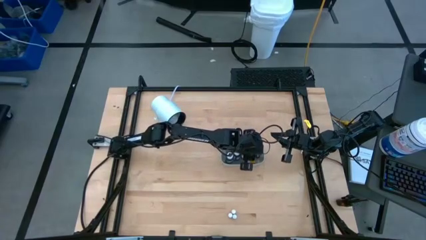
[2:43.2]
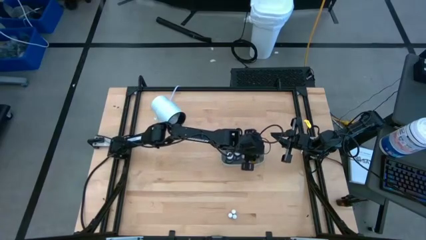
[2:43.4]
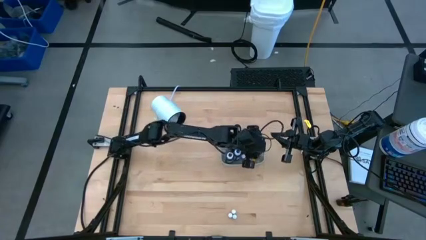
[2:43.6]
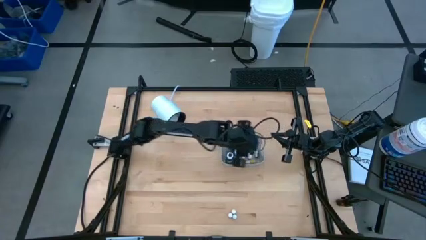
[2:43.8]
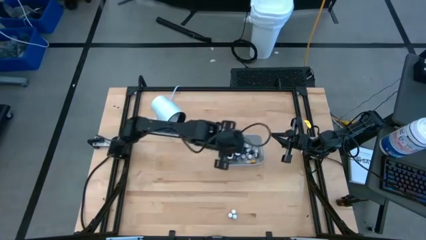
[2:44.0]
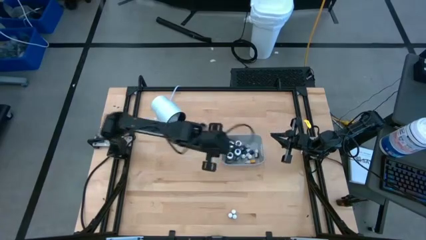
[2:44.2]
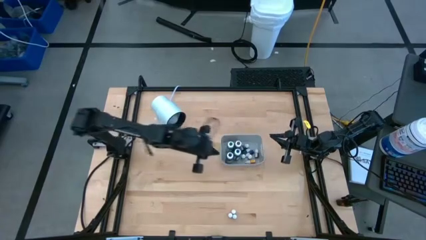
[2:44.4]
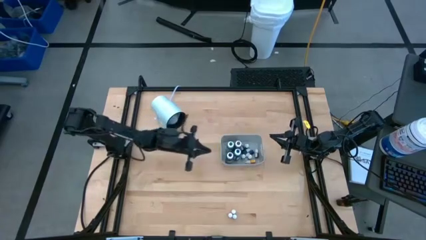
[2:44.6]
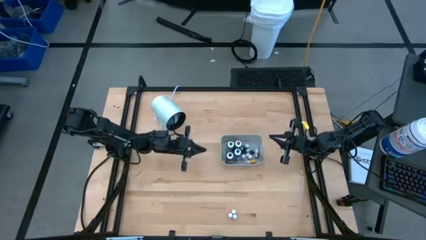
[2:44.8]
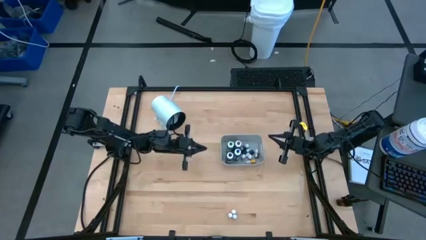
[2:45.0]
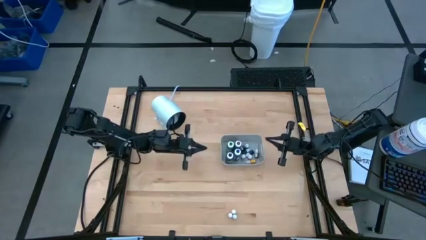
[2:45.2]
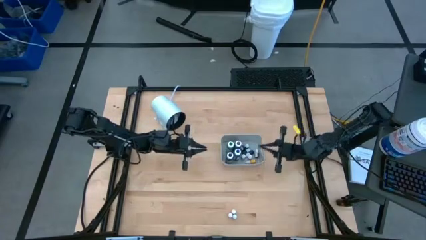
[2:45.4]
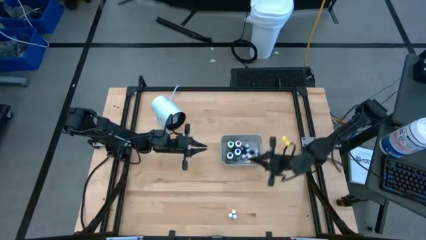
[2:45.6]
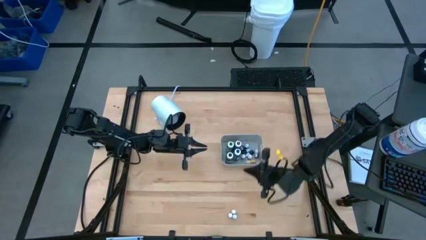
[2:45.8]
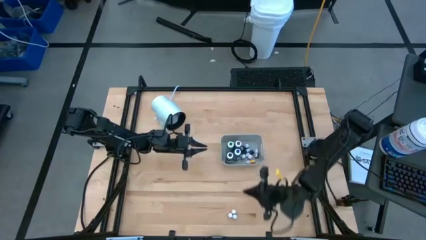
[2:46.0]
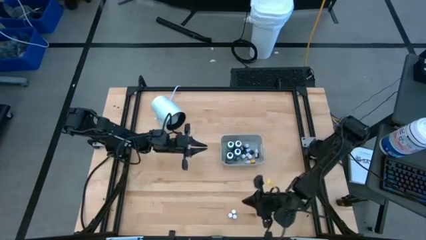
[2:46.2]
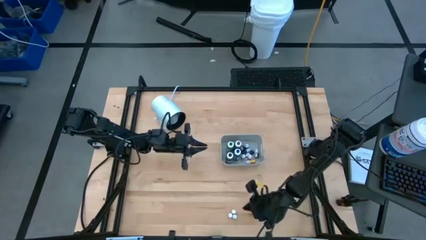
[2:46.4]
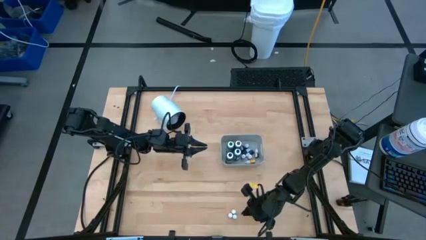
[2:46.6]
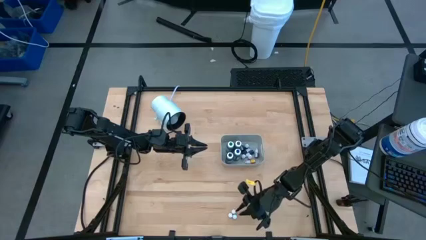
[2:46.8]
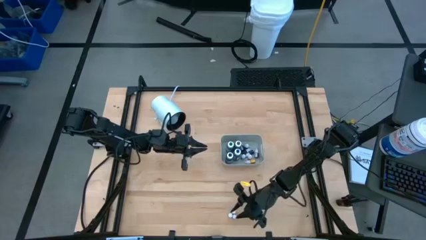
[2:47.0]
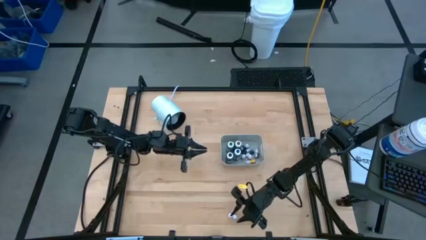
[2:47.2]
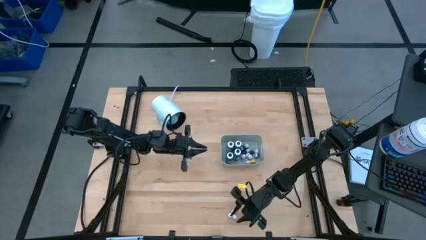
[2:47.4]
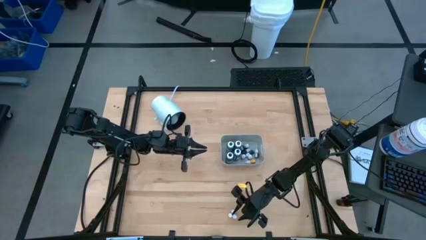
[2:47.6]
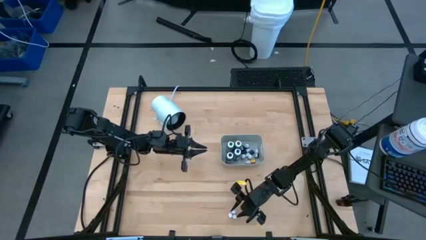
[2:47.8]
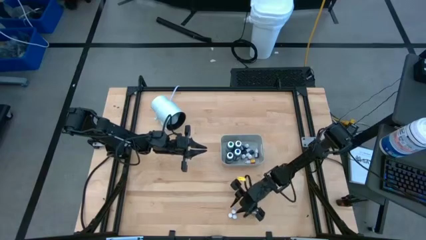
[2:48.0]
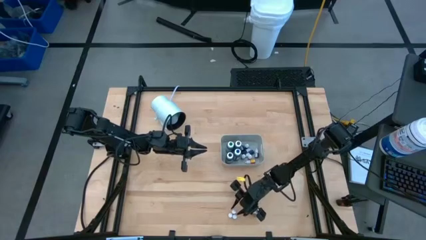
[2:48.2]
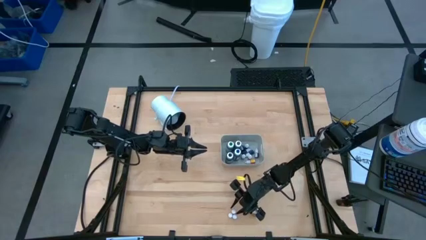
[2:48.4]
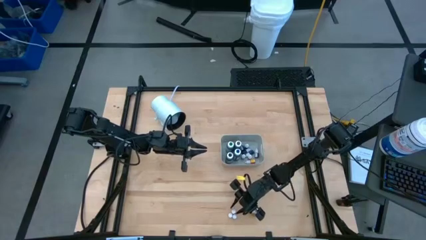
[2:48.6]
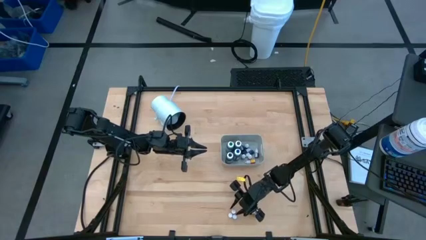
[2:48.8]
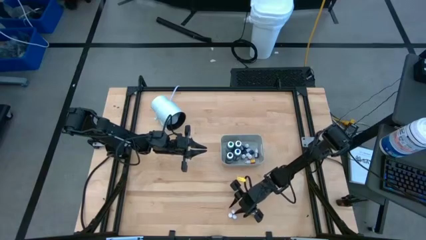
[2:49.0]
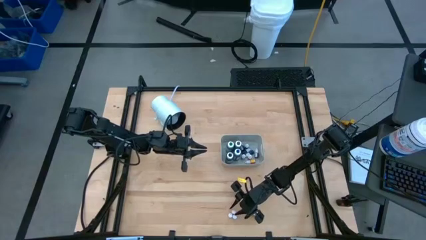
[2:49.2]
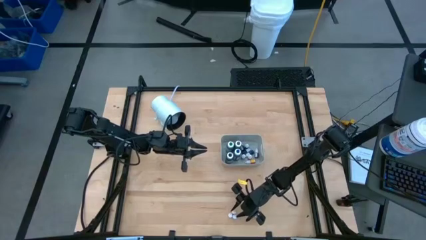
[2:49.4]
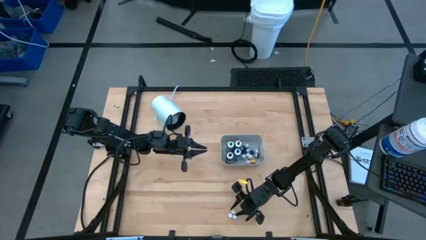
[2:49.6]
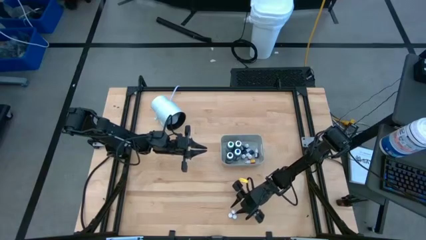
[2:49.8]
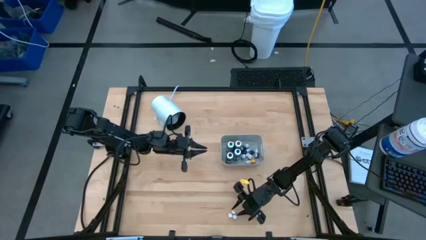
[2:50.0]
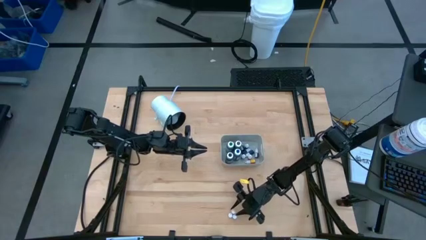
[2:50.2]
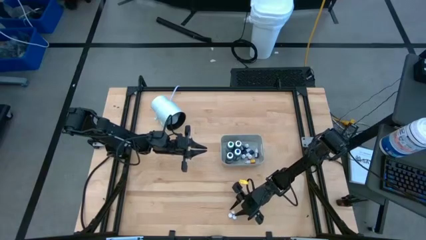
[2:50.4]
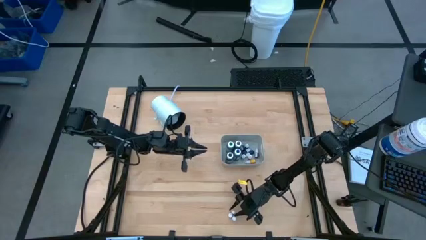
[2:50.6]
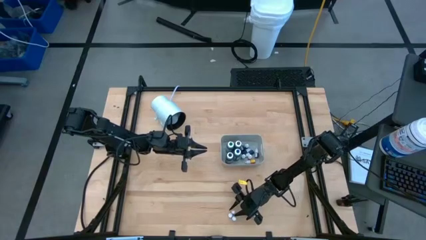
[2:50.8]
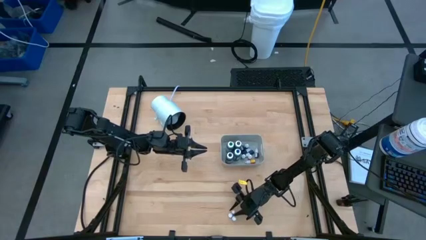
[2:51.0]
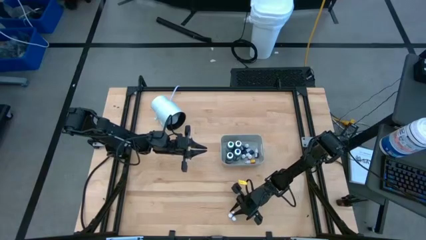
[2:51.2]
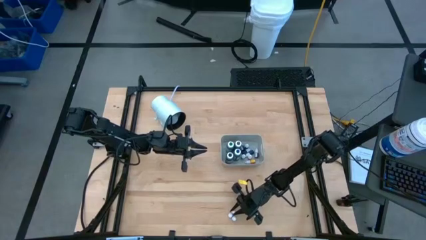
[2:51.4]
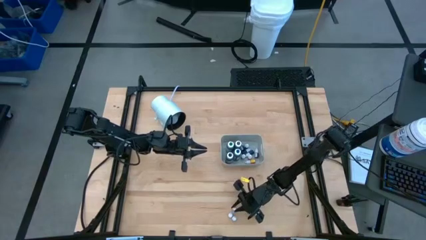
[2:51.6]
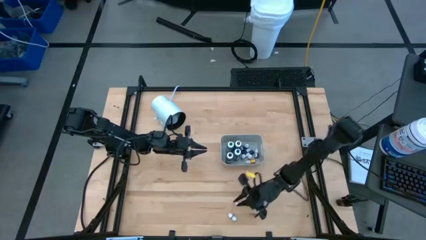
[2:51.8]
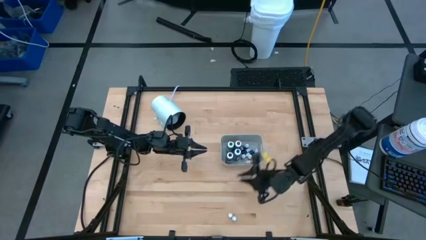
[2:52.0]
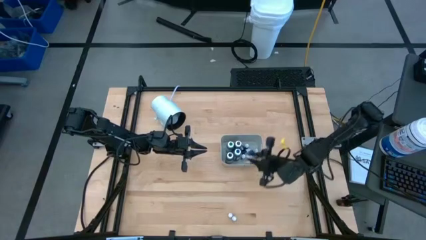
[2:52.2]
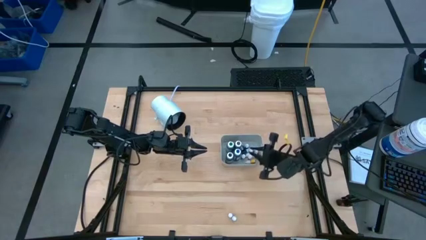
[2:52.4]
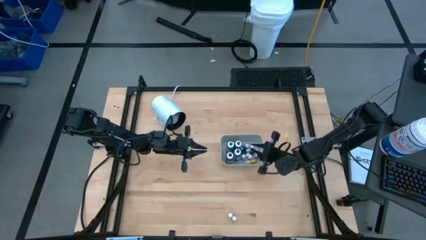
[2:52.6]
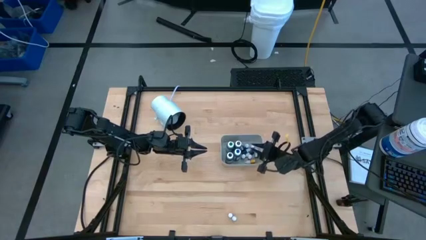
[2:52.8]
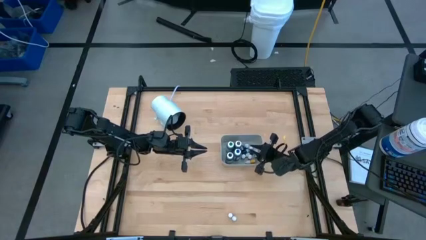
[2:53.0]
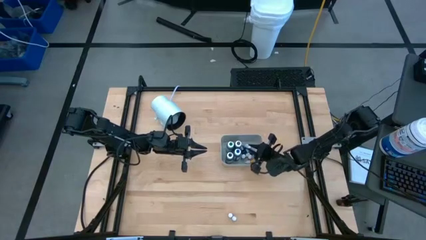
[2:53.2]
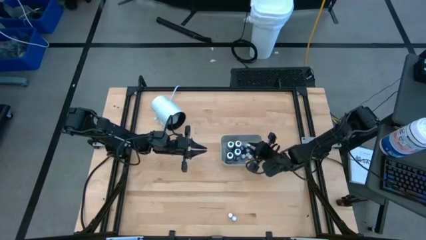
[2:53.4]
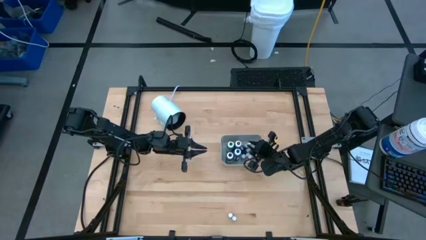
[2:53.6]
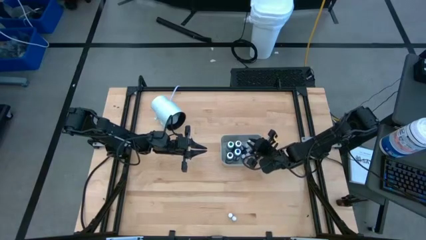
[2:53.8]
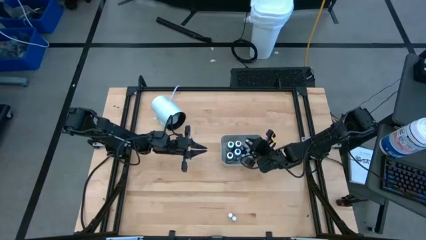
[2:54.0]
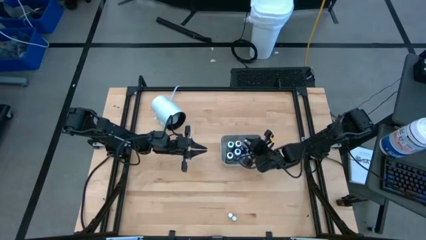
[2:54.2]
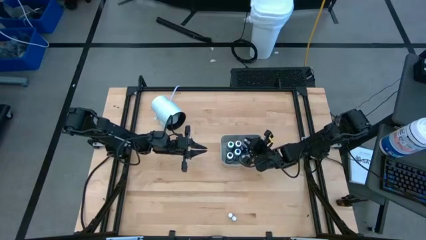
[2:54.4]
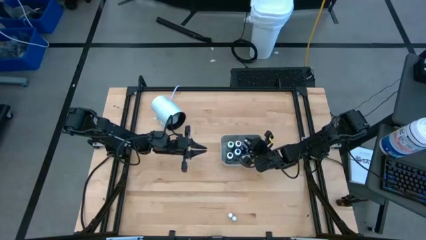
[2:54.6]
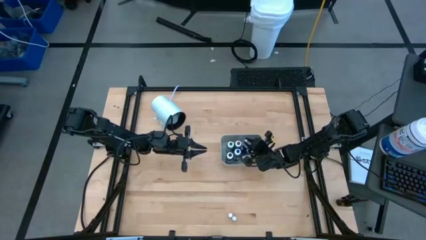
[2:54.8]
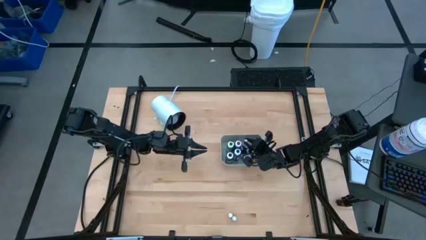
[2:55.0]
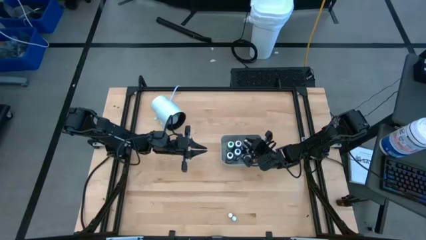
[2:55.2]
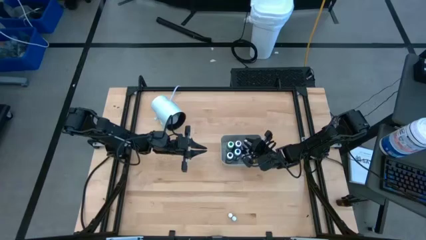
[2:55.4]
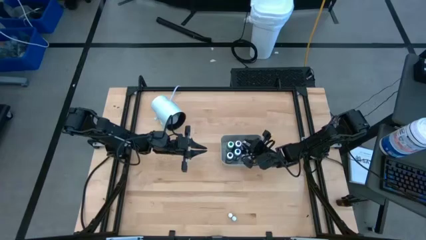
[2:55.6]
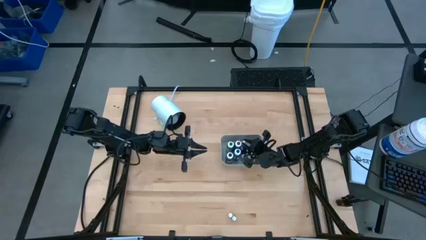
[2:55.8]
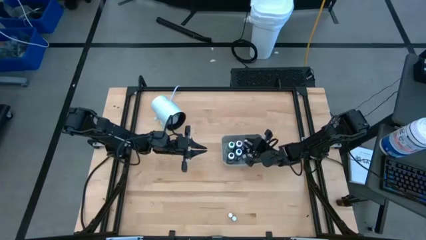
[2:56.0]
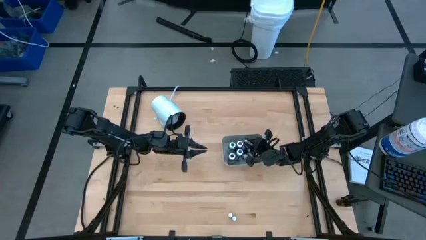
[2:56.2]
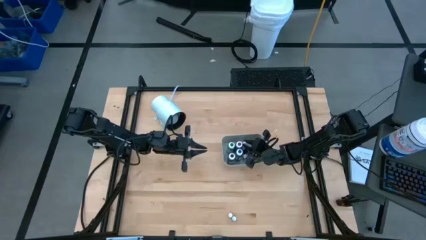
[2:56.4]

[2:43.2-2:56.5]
Task: Pick & Place food coloring
Put the small yellow food coloring bottle into the gray bin

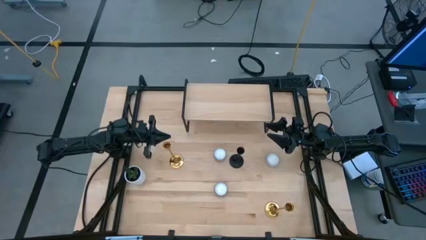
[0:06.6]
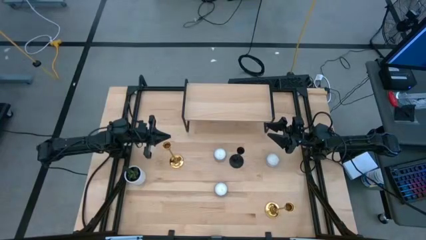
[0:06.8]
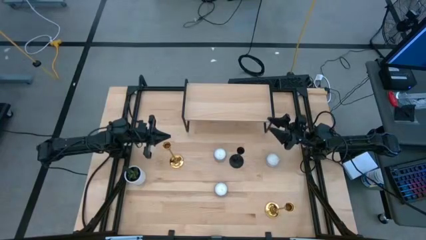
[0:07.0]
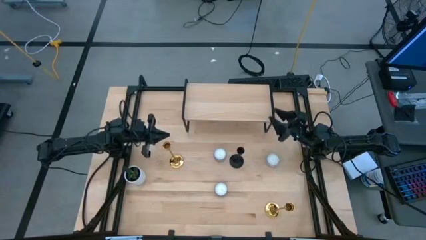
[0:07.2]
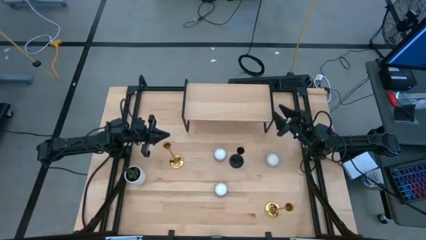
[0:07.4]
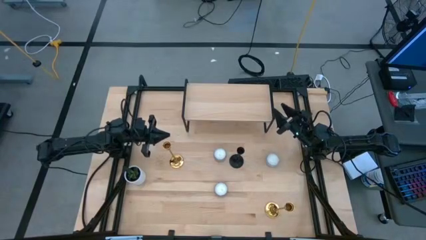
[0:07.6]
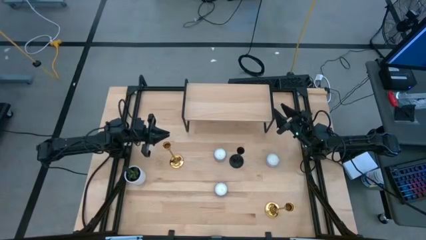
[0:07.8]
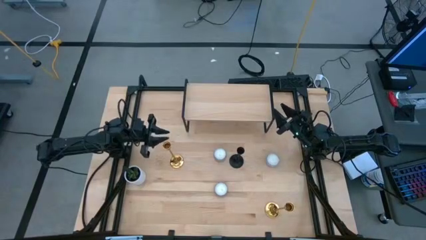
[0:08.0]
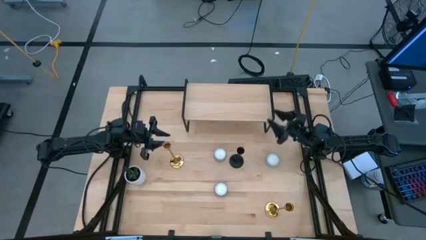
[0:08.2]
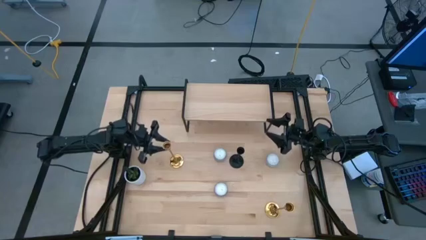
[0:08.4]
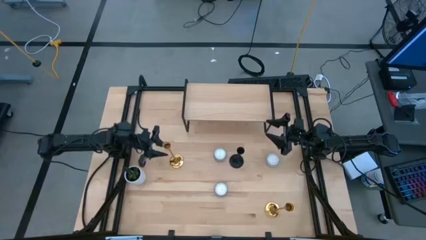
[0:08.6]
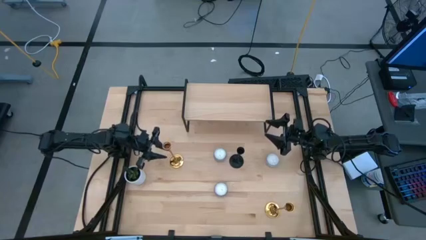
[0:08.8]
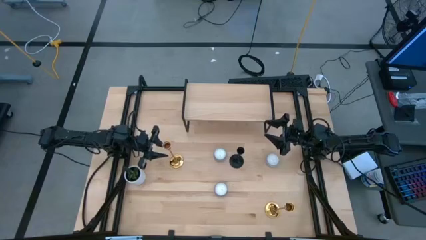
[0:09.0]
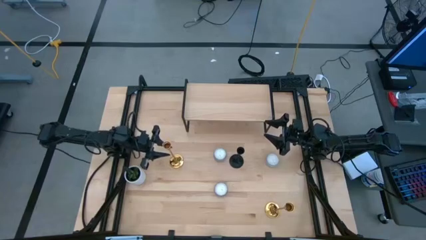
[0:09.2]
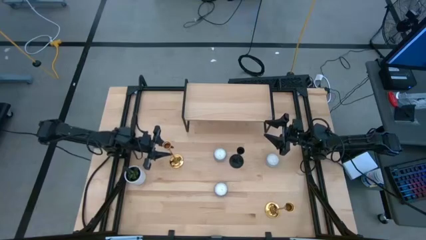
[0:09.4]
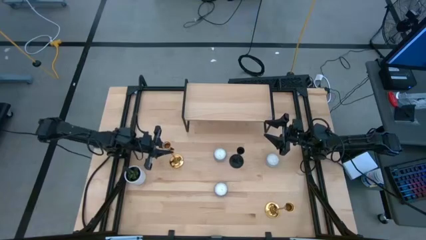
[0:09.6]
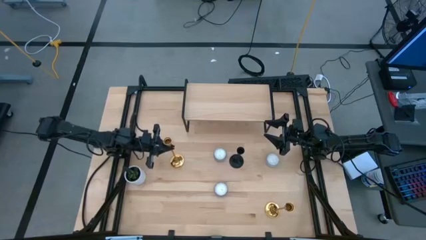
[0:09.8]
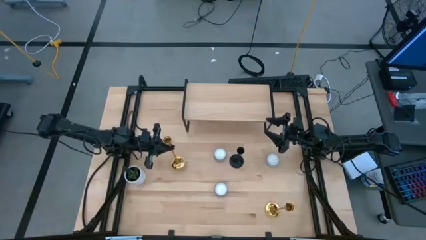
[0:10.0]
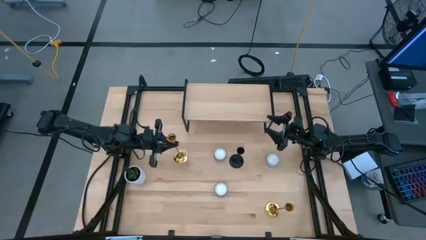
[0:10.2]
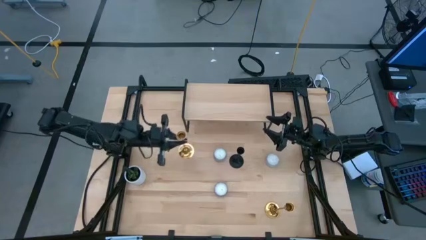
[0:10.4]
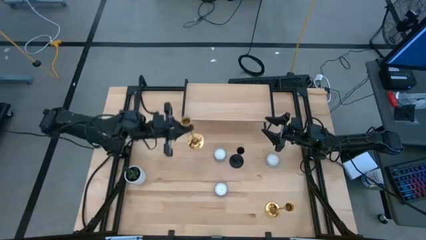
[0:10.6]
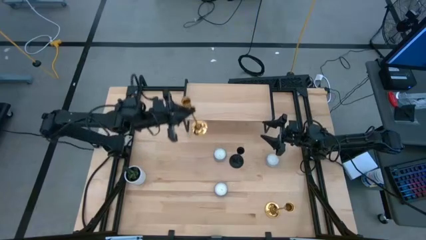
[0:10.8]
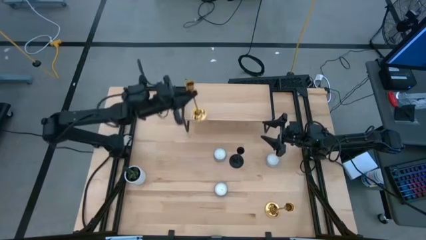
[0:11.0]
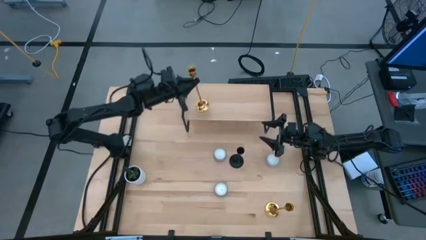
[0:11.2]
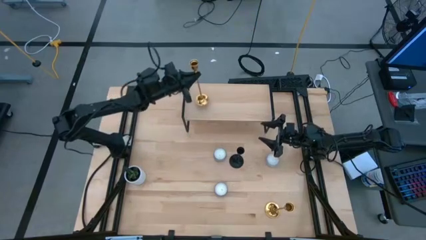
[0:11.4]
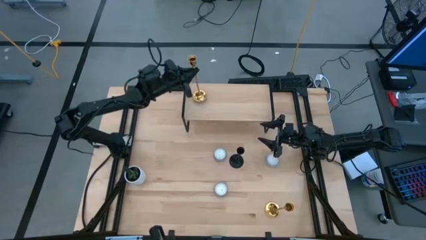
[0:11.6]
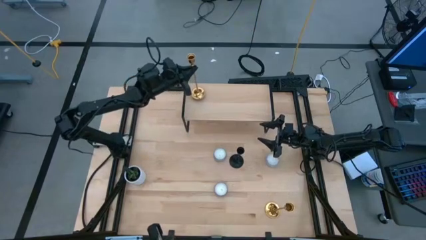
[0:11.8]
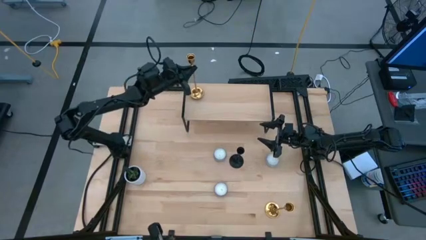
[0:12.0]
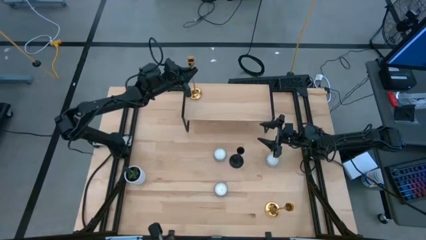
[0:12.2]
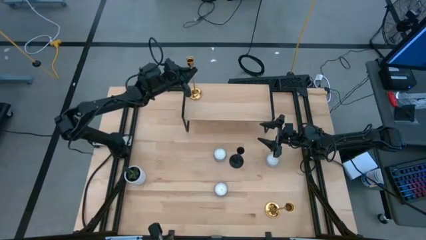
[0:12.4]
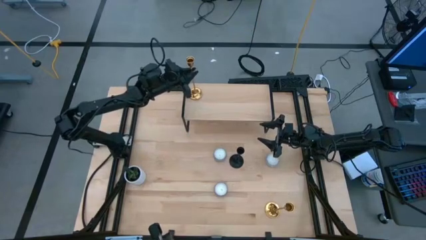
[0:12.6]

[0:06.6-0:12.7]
Task: Pick & Place candle stick holders
Put the top golden candle holder on the shelf
